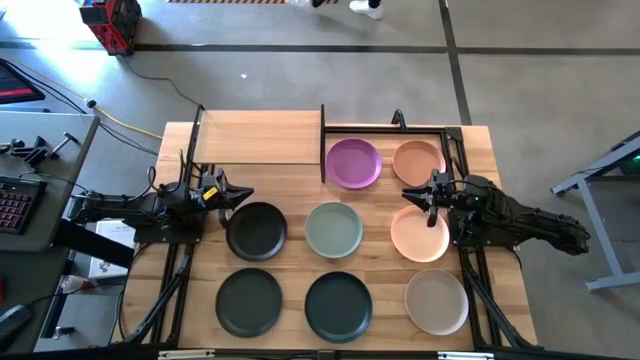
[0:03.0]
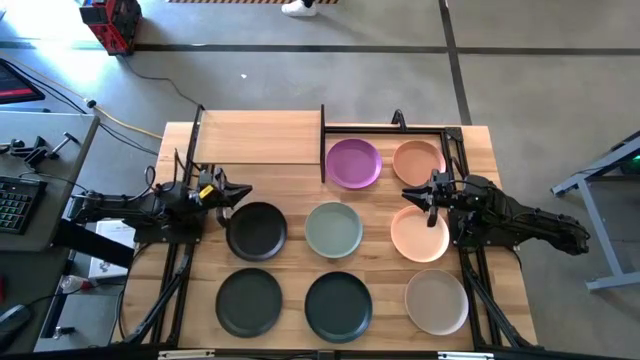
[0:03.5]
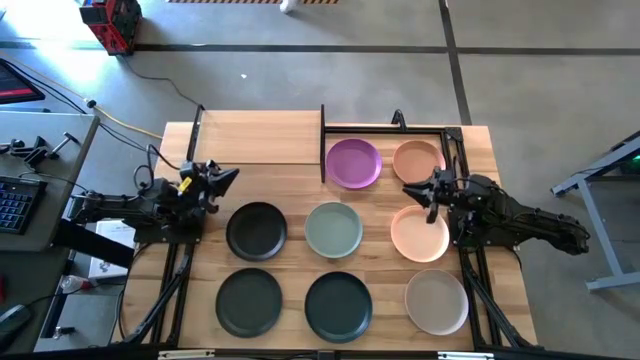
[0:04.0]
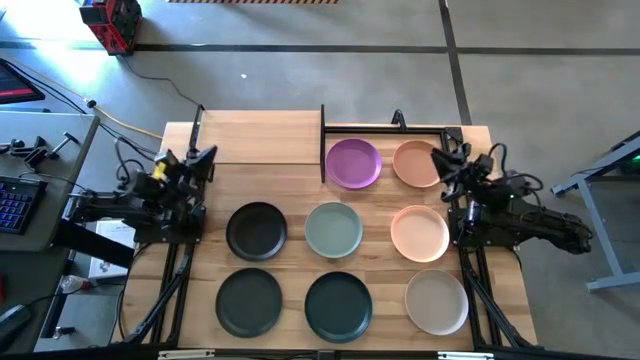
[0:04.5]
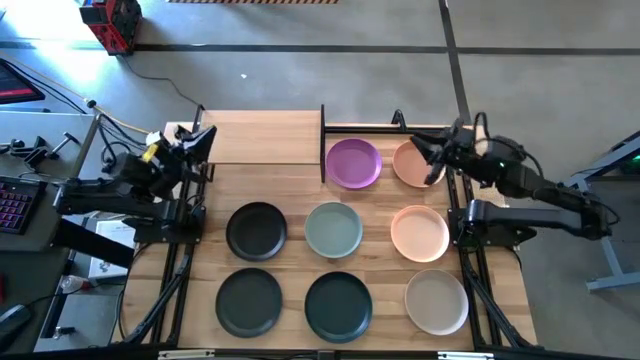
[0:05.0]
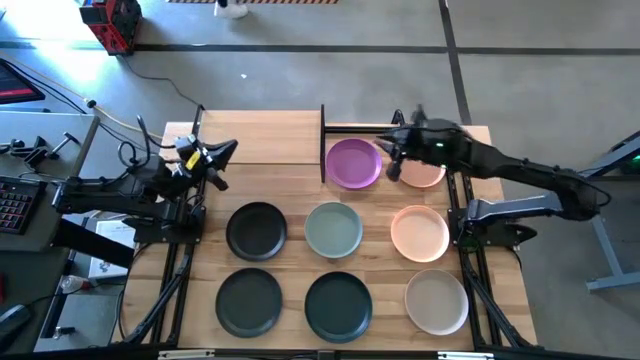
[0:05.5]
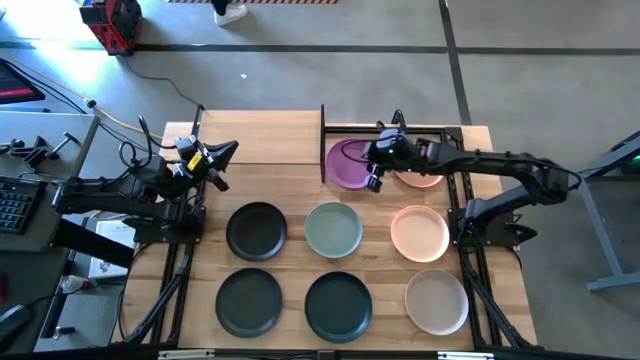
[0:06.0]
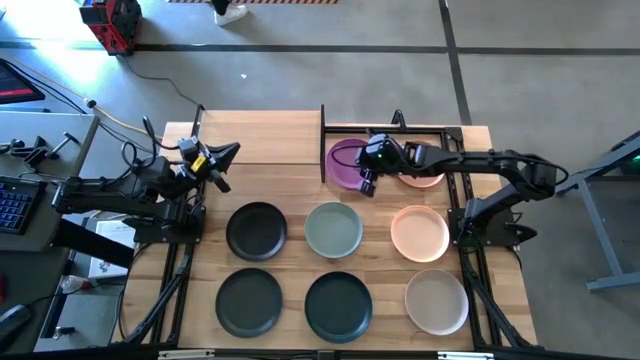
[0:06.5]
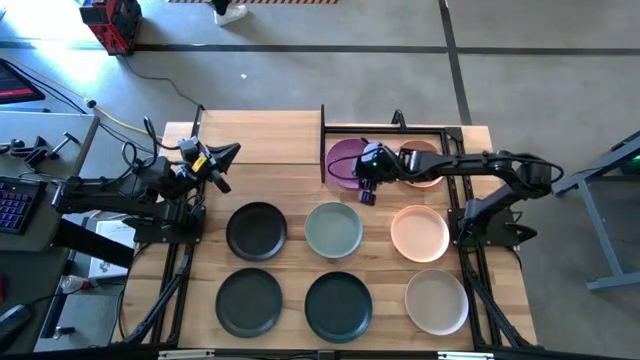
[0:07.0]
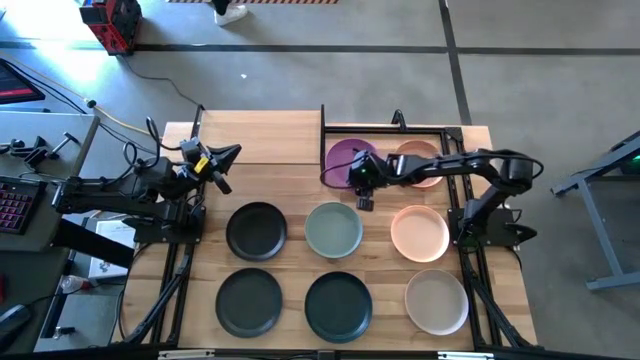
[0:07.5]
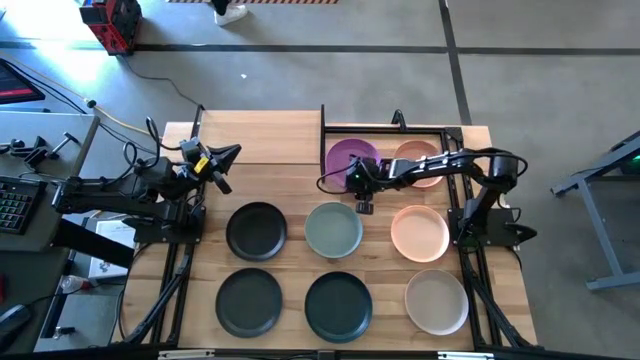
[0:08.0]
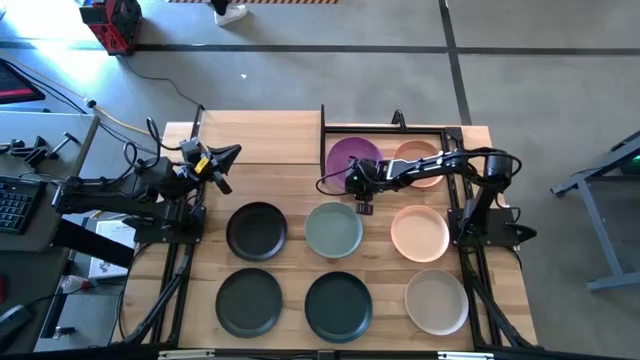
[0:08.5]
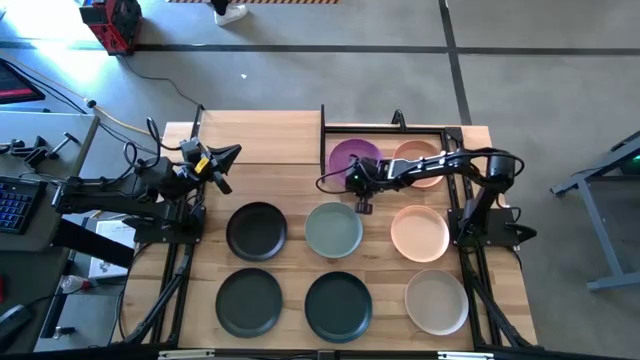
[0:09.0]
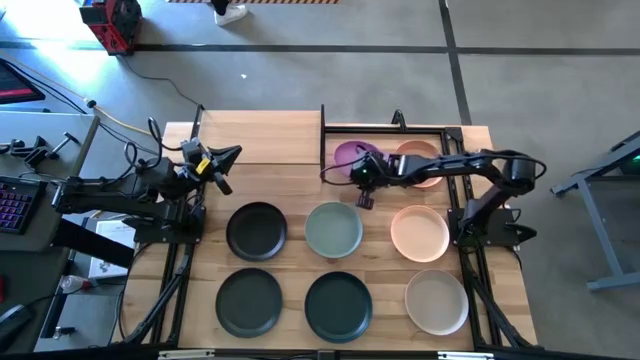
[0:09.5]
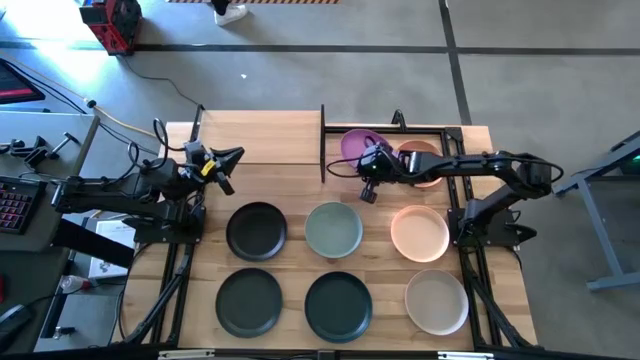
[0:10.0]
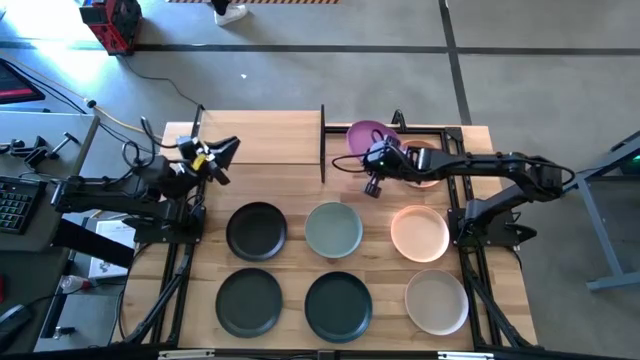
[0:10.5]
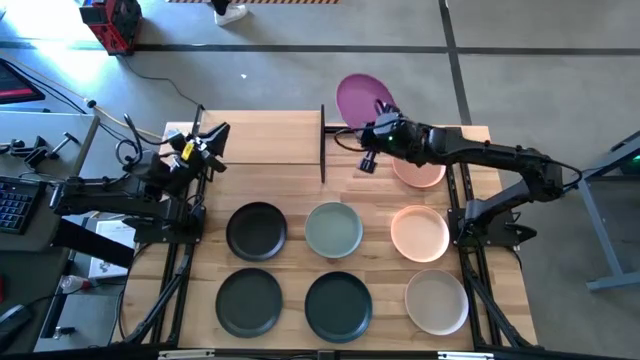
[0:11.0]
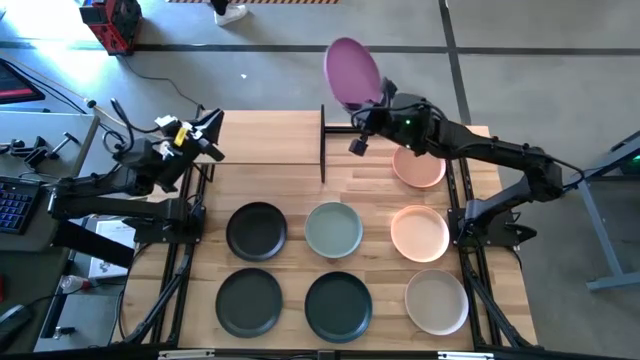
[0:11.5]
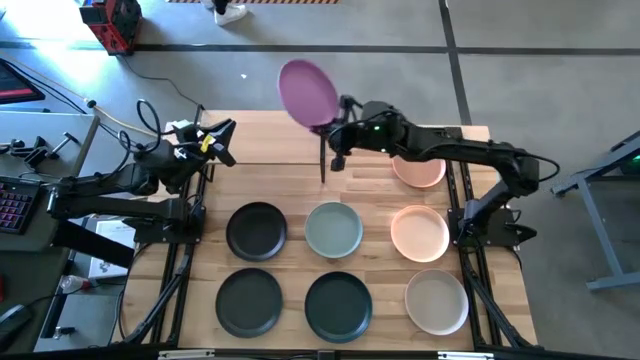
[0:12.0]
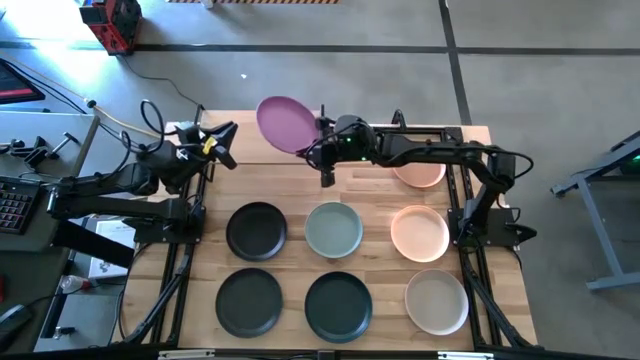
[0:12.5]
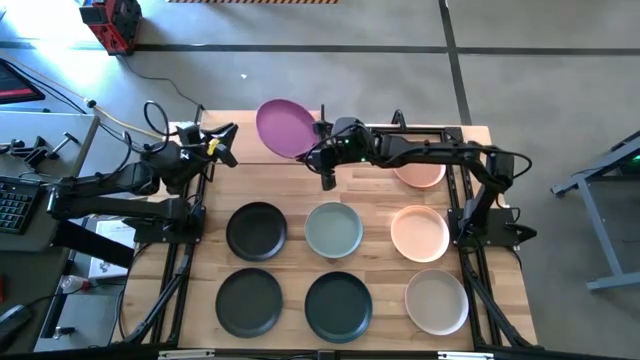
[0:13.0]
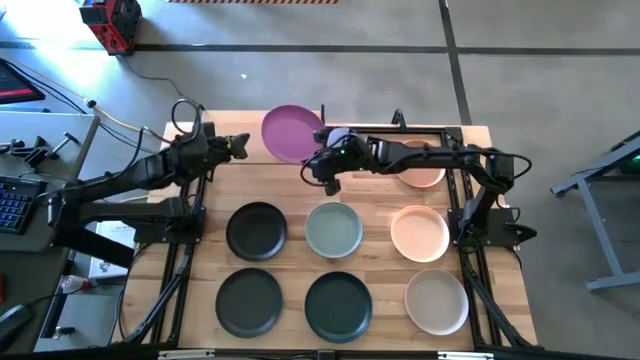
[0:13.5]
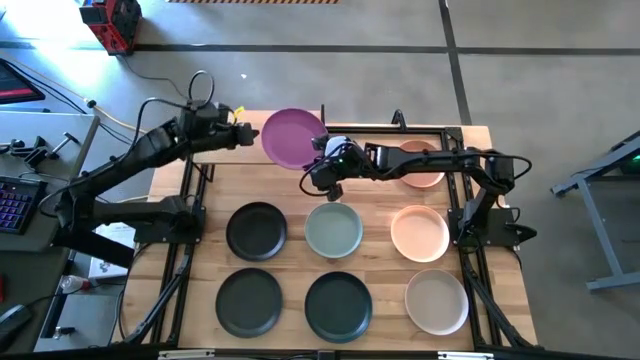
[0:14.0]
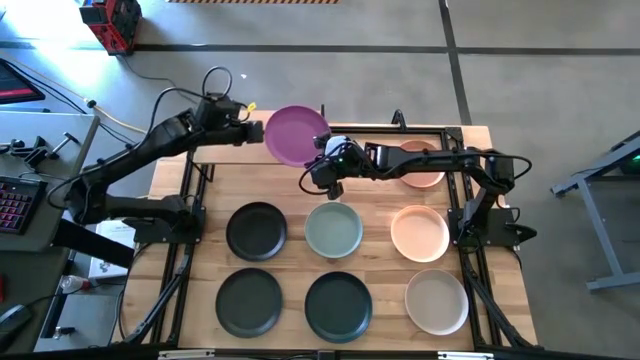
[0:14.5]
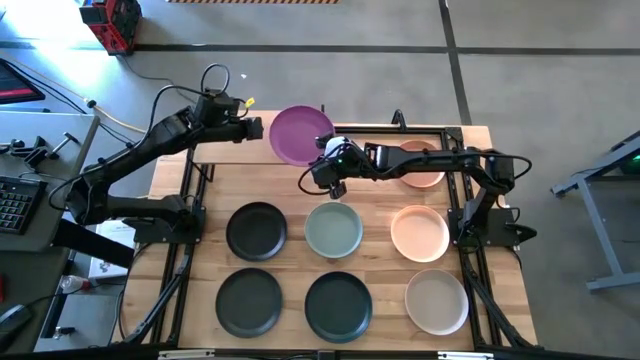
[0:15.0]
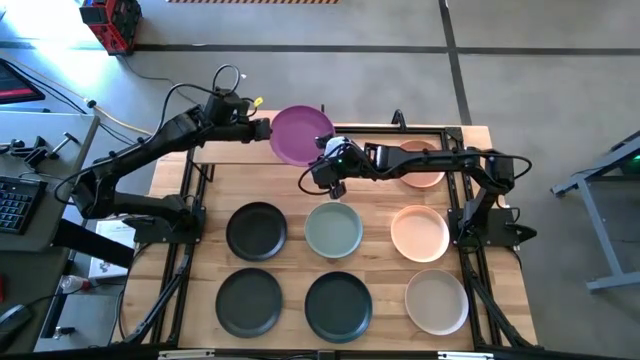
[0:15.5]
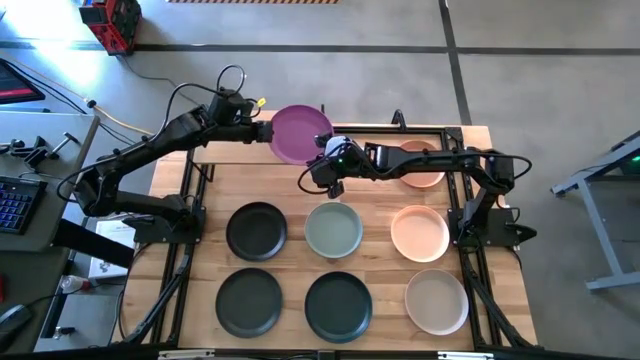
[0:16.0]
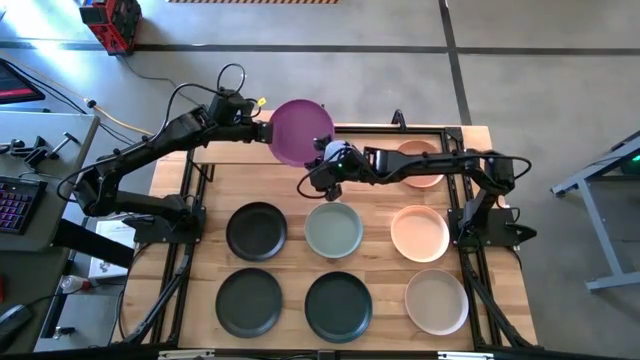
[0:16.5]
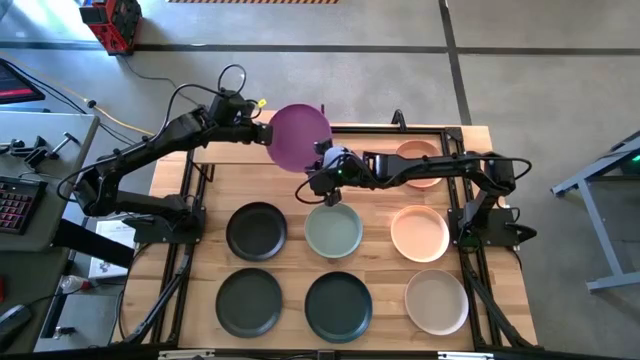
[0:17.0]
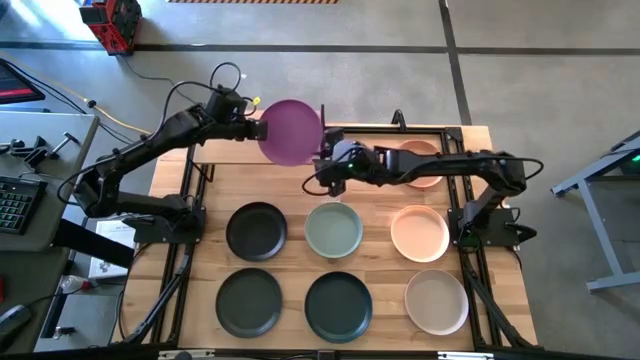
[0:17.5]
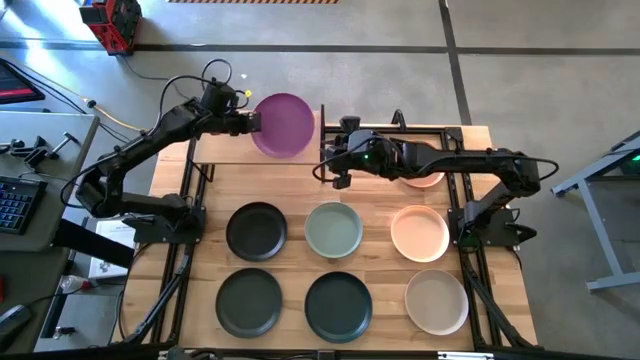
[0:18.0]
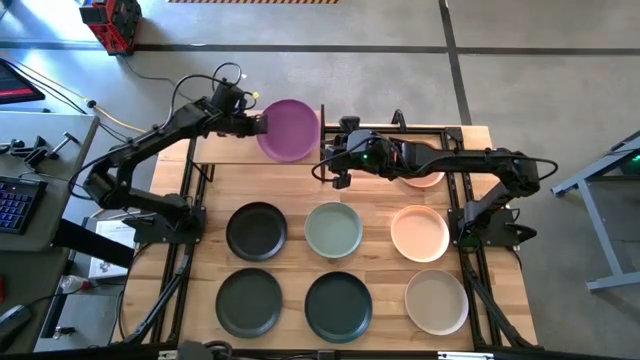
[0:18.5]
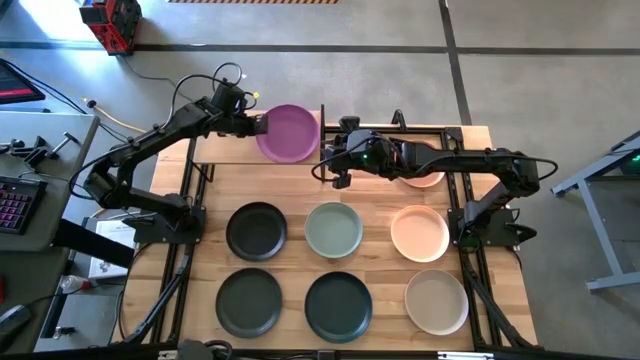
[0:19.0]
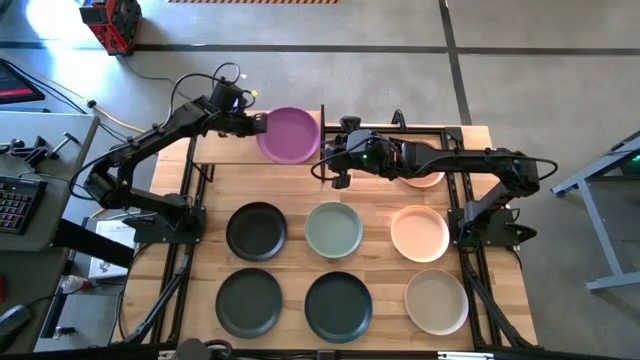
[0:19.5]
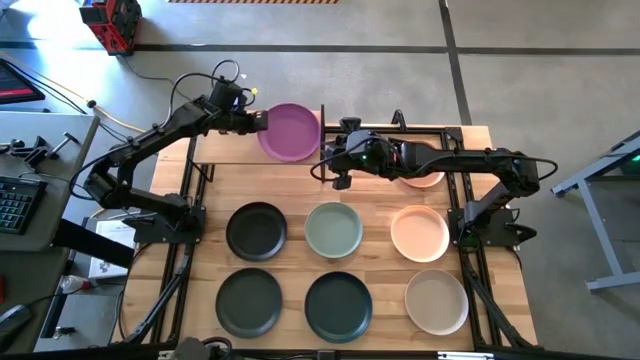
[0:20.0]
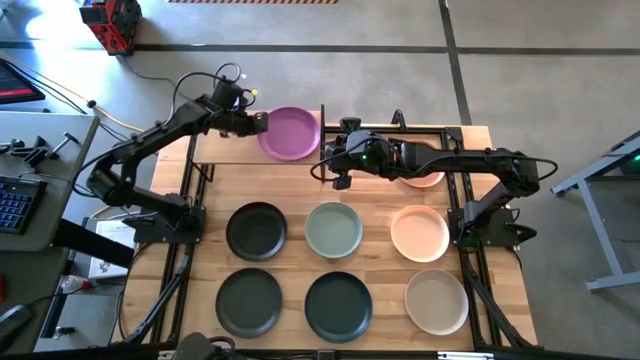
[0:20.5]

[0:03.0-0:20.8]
Task: Place and stack plates onto a shelf
Put the violet plate on the shelf
